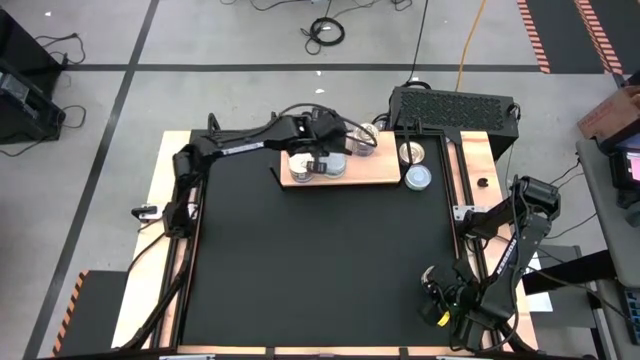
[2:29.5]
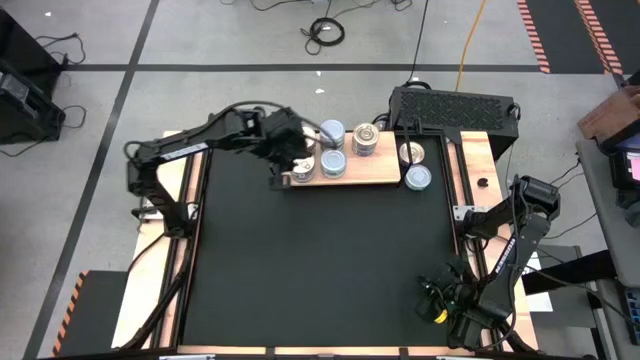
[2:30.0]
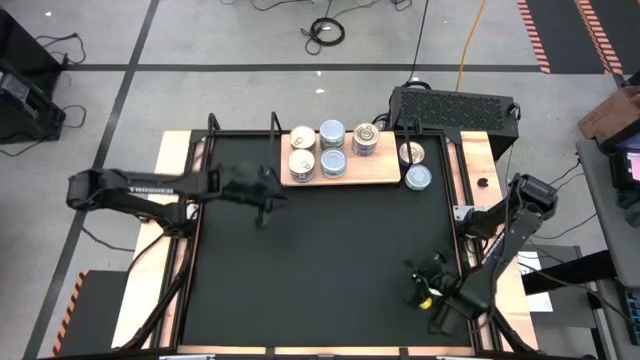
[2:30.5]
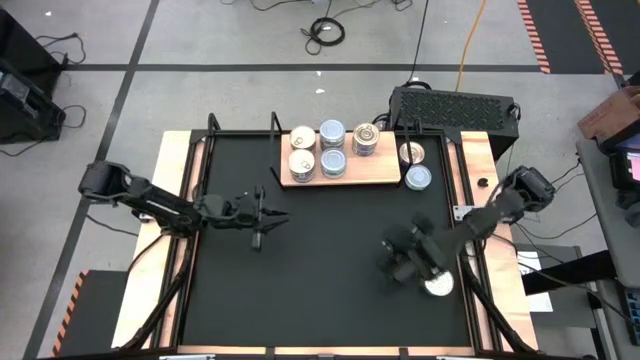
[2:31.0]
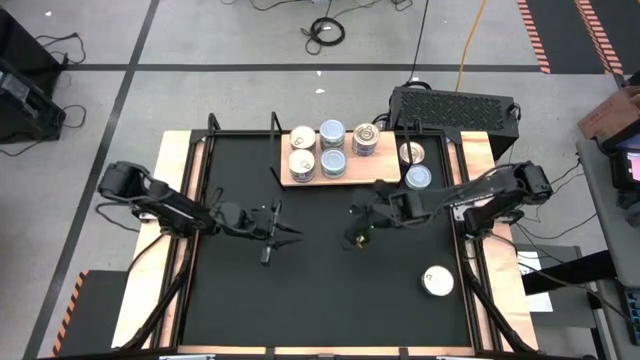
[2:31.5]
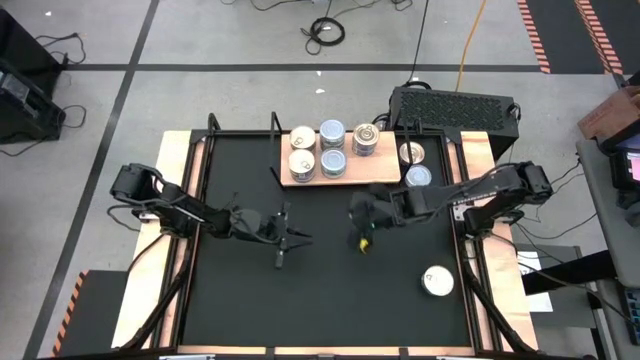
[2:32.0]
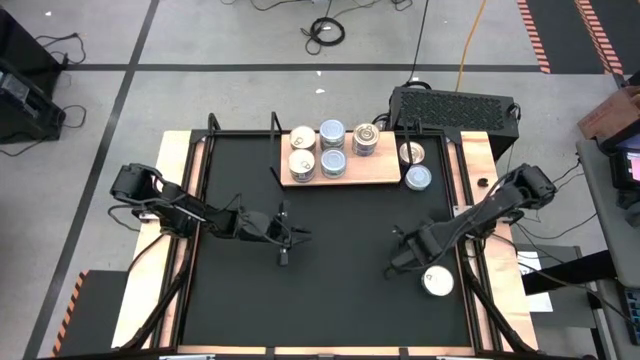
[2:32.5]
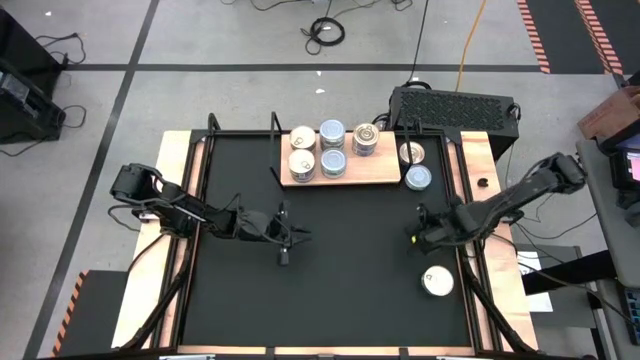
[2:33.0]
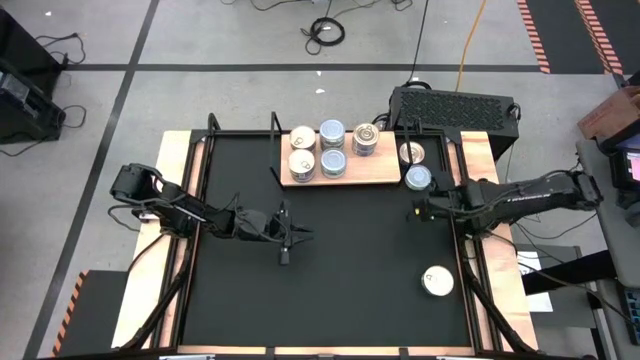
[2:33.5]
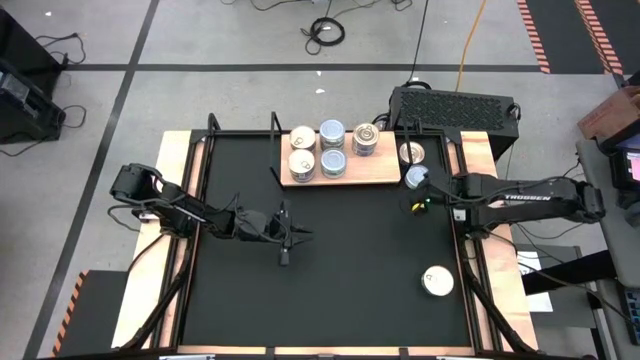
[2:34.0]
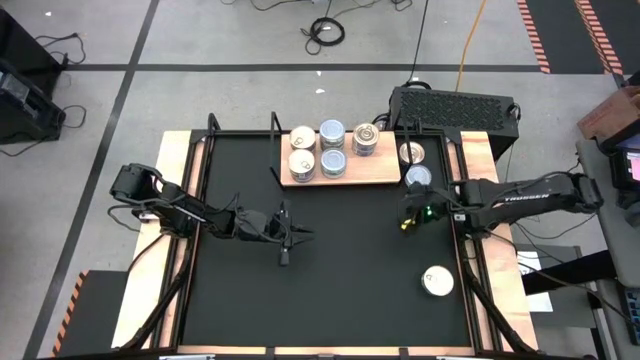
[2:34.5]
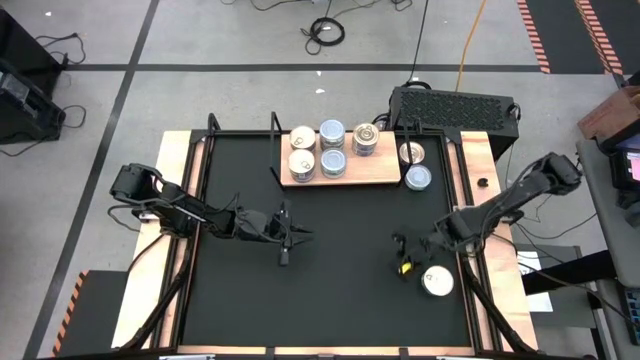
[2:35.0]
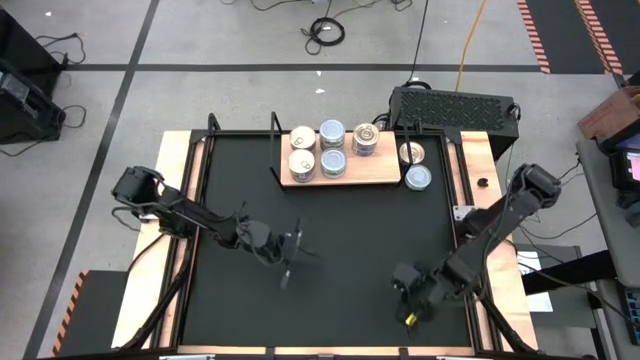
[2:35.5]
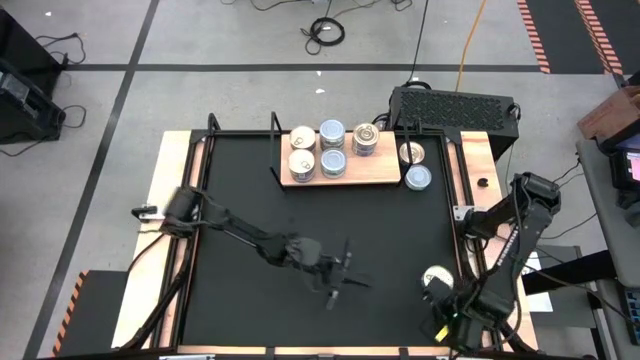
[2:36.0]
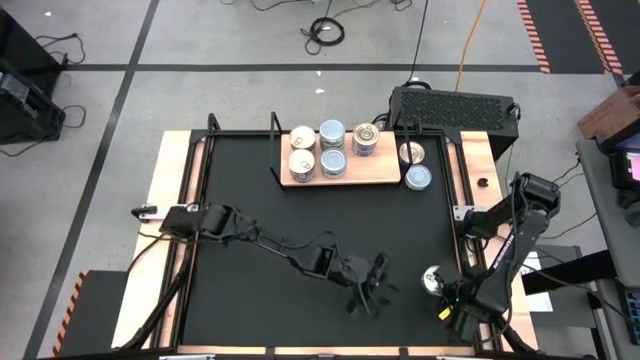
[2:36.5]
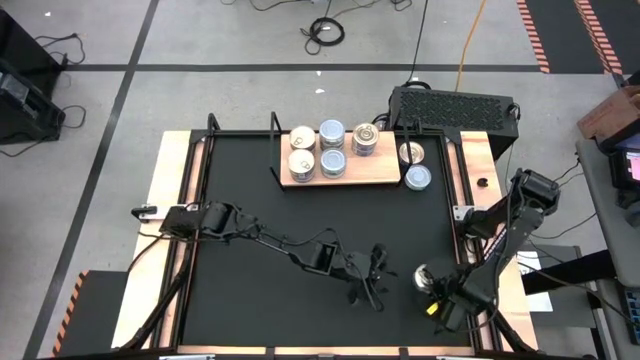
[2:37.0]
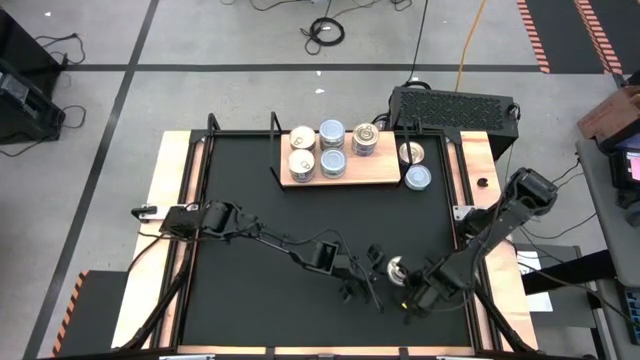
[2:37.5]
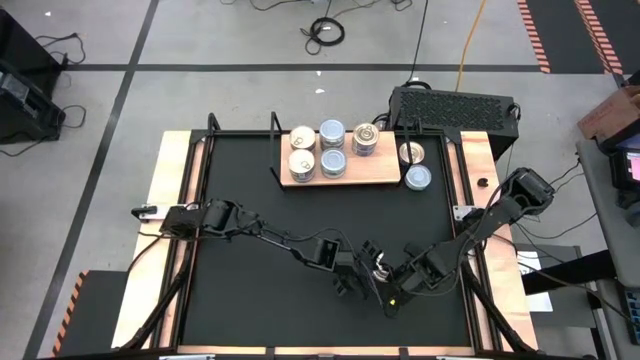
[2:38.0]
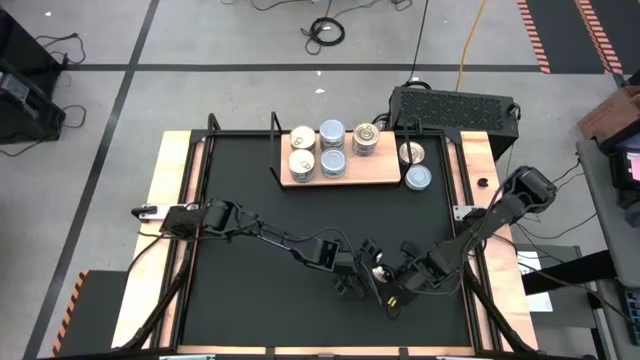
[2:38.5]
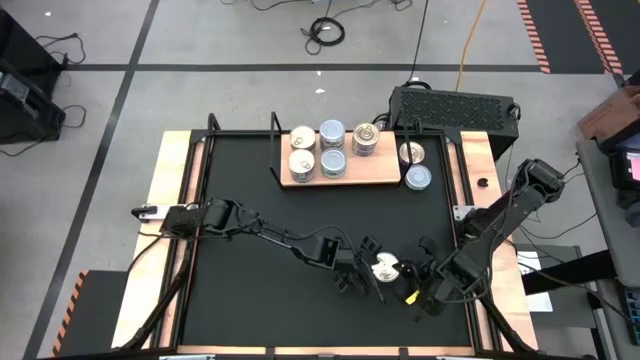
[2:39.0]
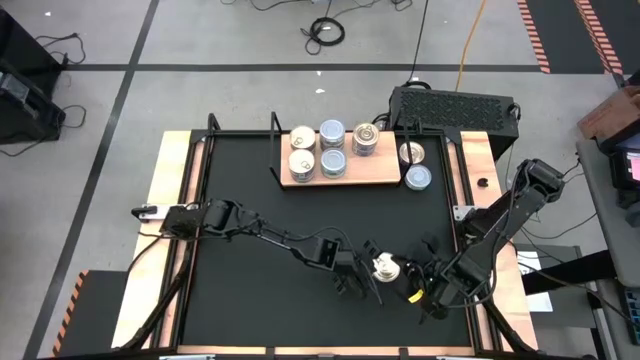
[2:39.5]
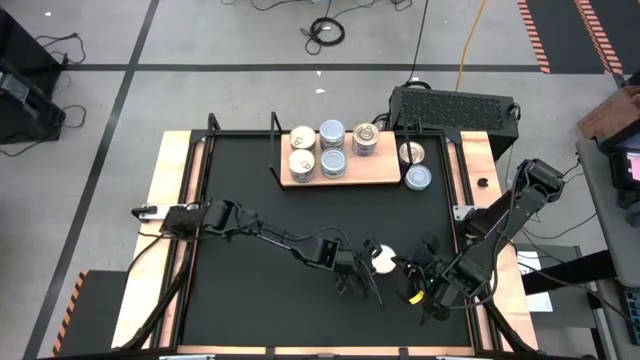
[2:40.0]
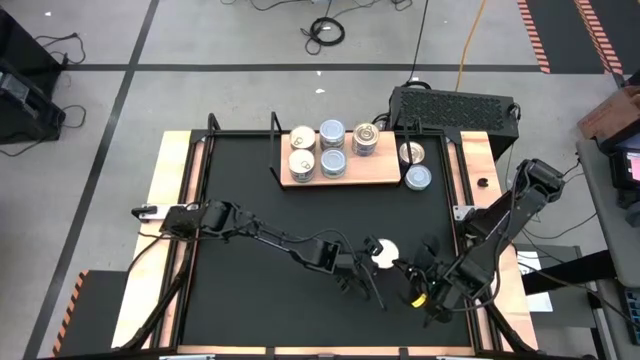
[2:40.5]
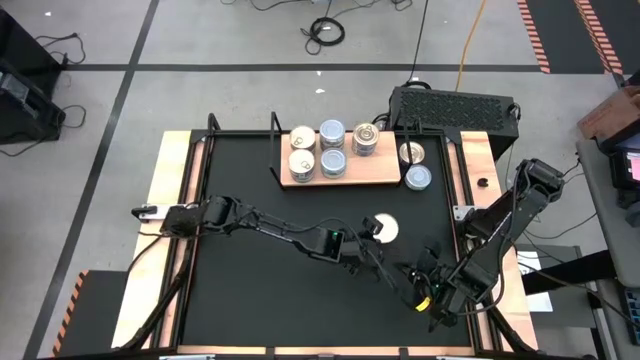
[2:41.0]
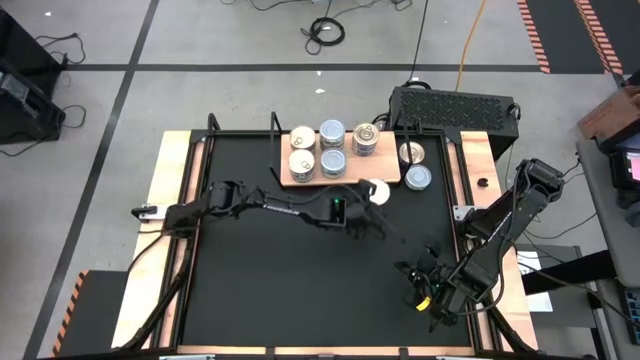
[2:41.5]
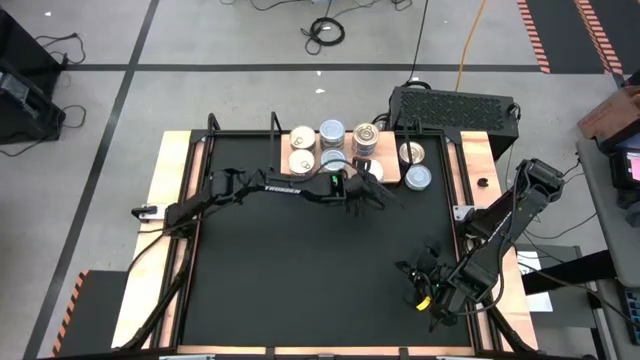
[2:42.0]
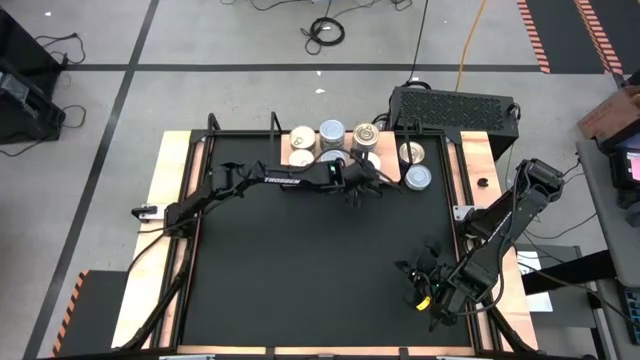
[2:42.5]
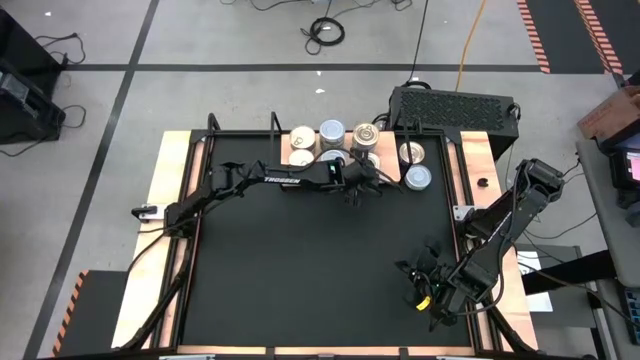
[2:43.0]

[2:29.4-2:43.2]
Task: Stack canned seafood by type on shelf
Put the bottom blue tuna can on the shelf

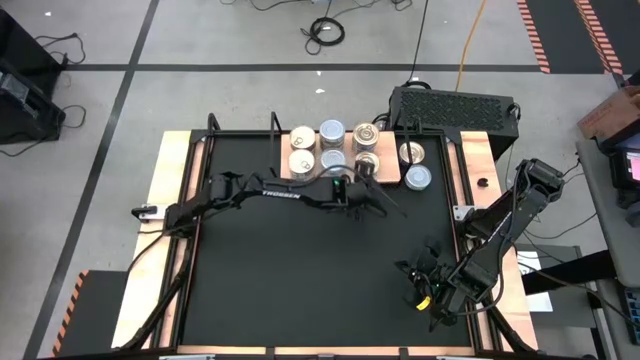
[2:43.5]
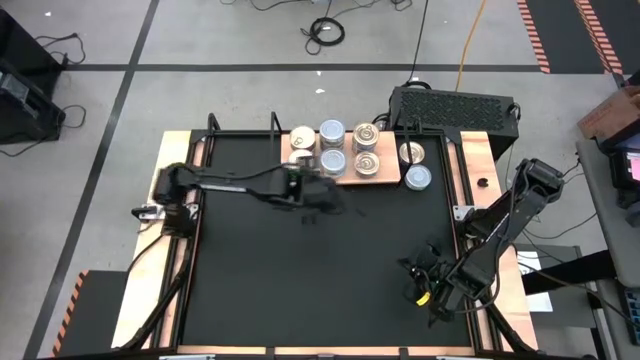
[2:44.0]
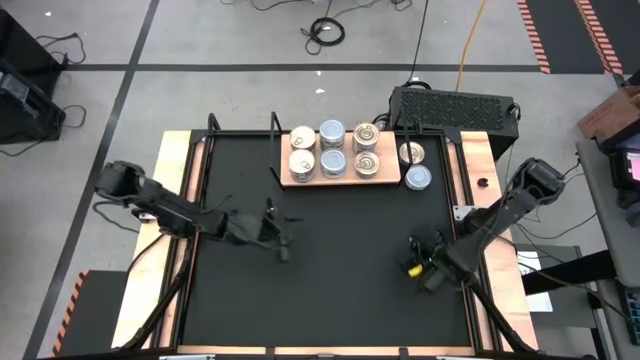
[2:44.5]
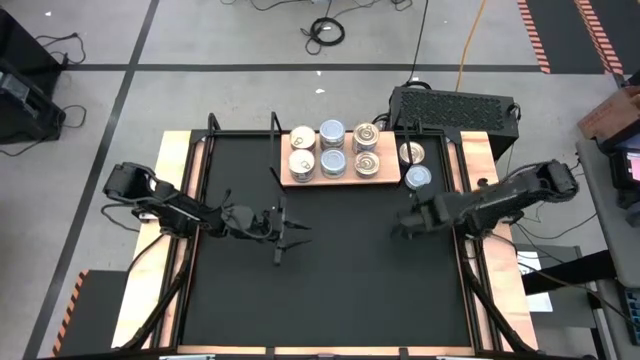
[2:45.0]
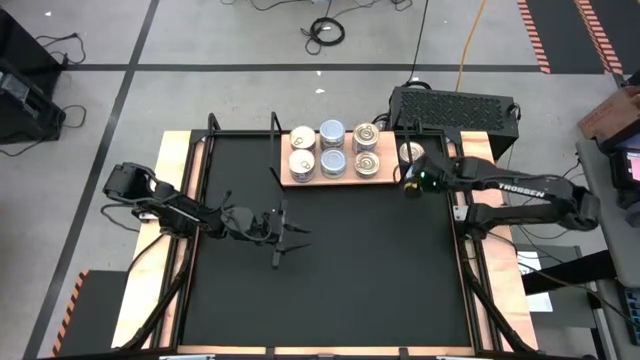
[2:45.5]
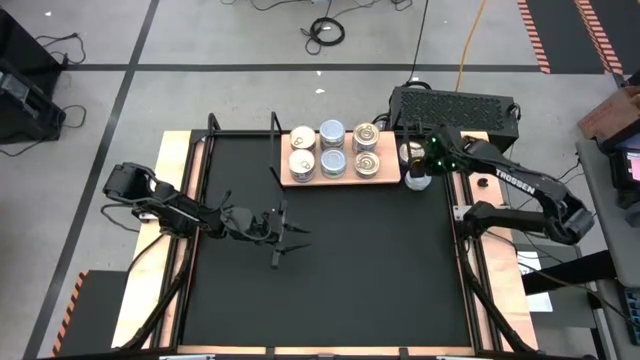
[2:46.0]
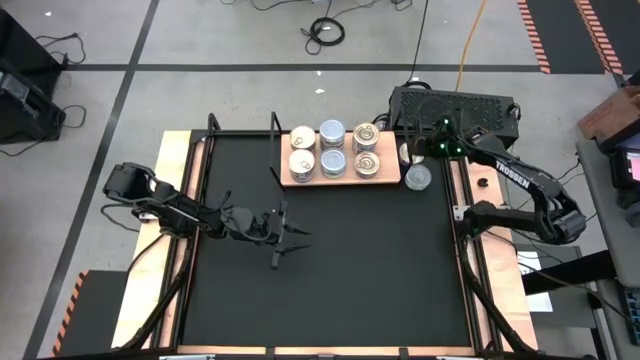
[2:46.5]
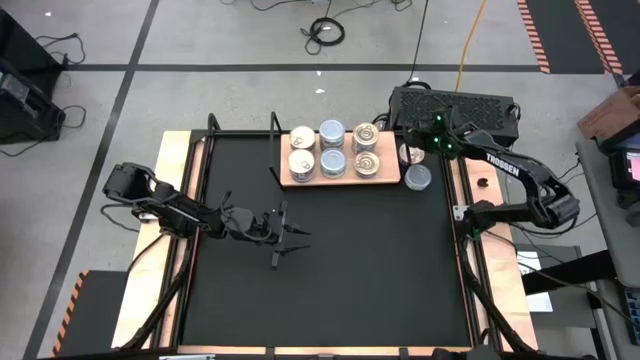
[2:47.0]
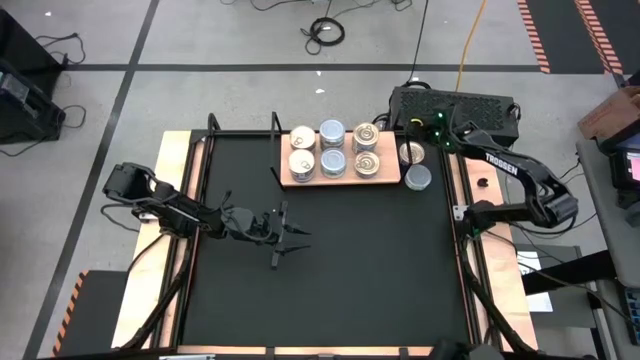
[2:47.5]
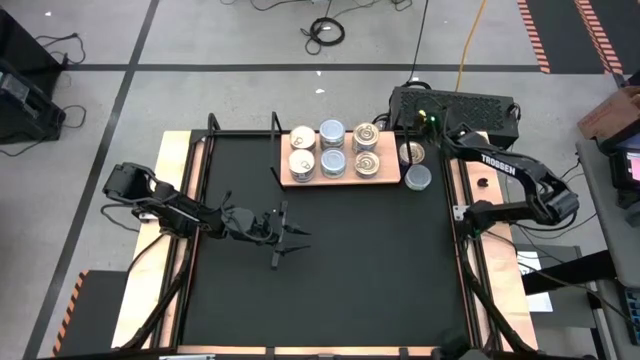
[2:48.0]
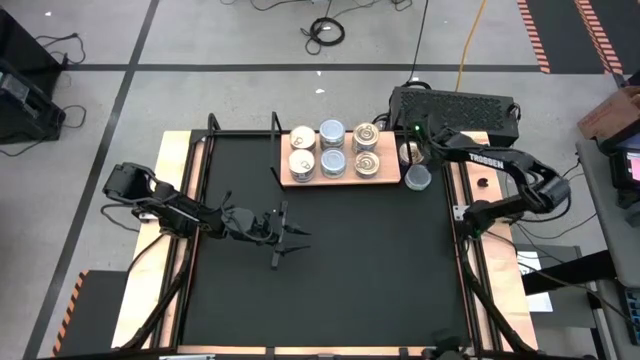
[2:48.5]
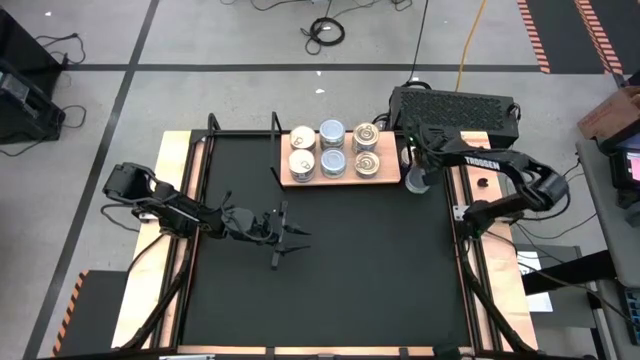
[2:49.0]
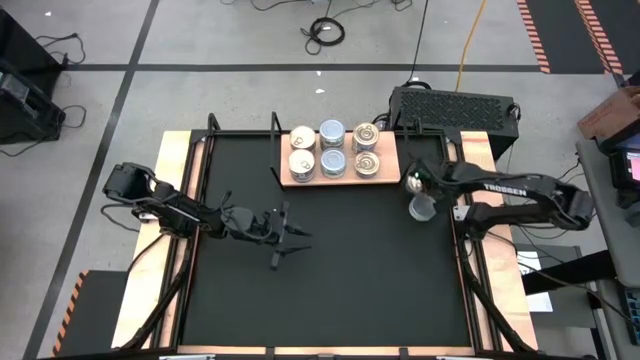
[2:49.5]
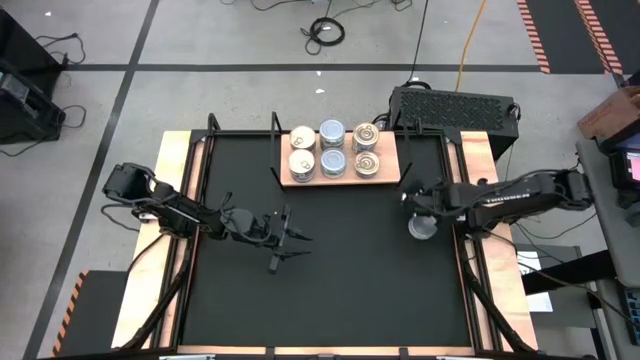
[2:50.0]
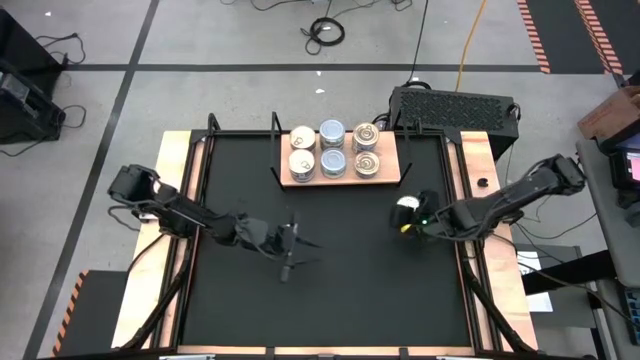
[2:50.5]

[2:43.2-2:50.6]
Move the cans to the middle right of the table
